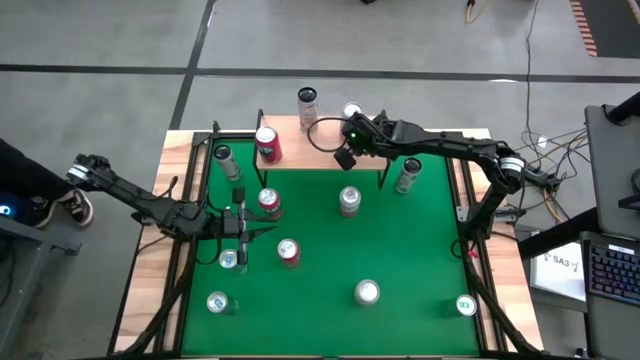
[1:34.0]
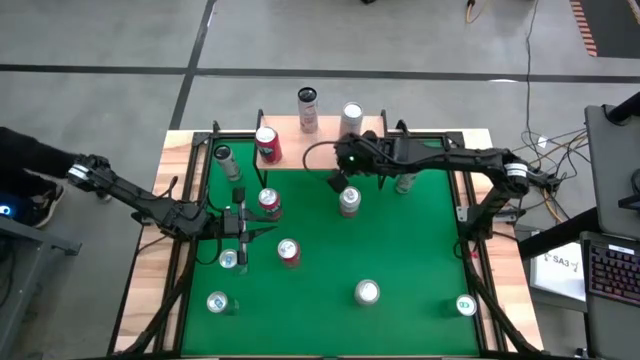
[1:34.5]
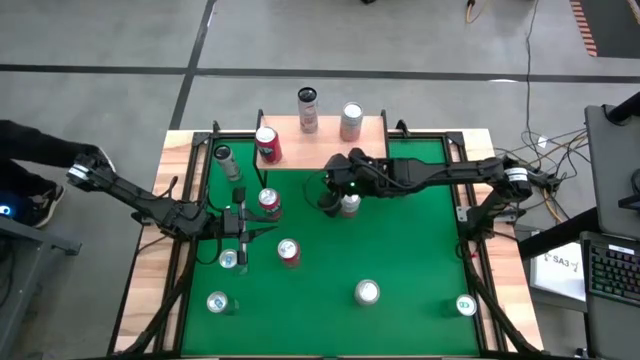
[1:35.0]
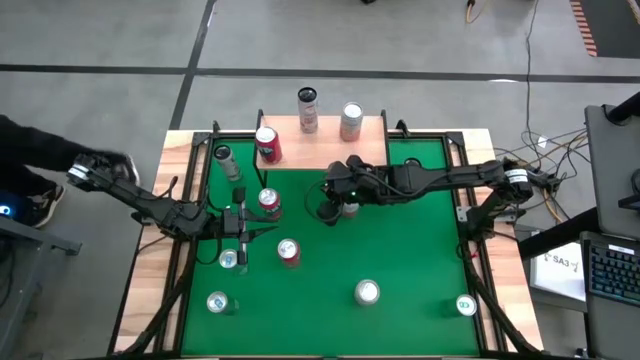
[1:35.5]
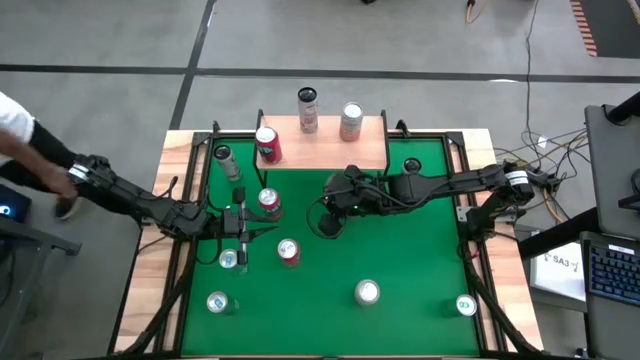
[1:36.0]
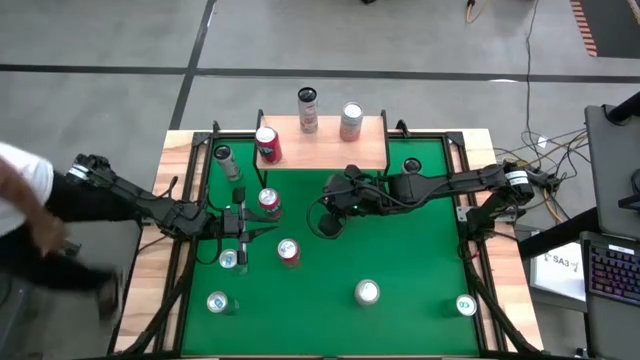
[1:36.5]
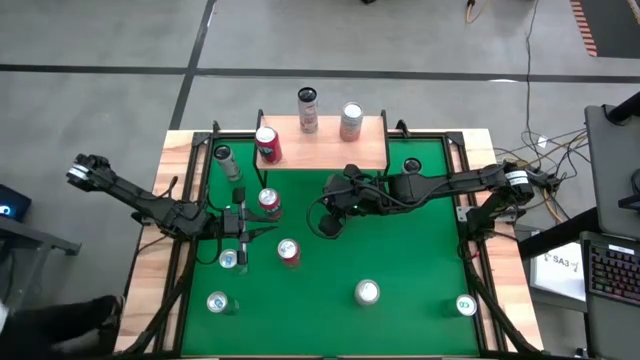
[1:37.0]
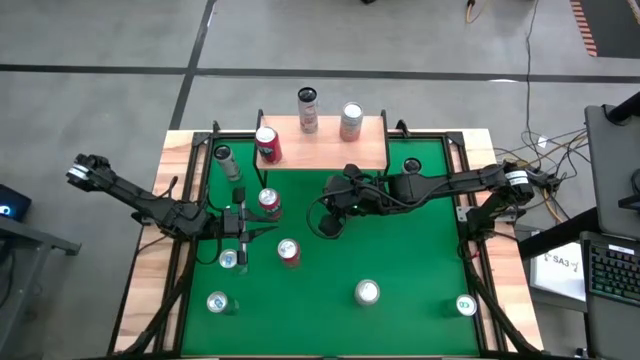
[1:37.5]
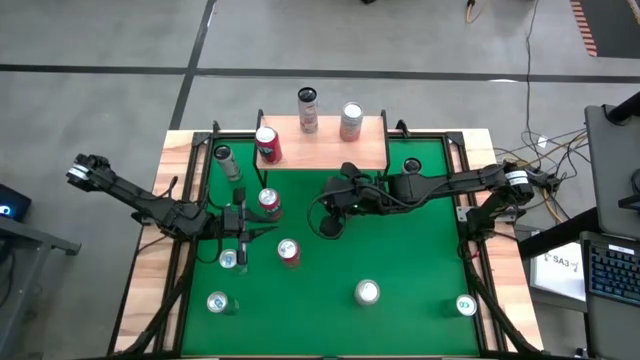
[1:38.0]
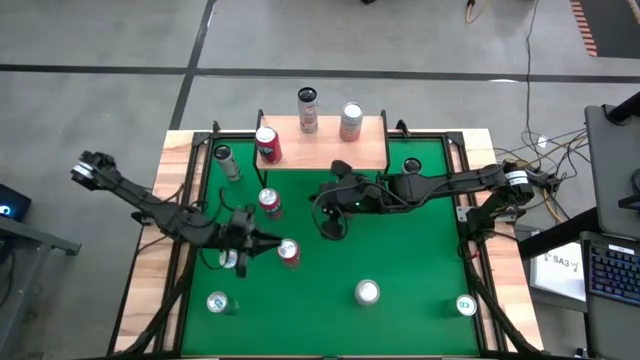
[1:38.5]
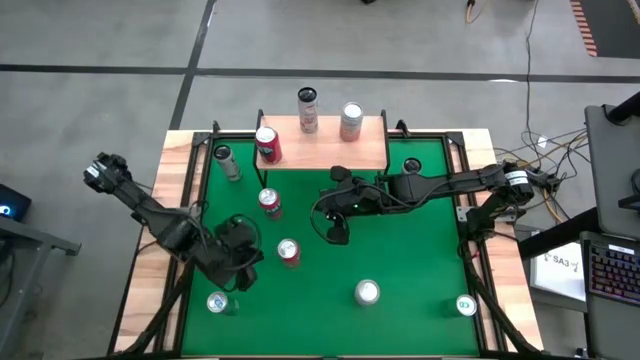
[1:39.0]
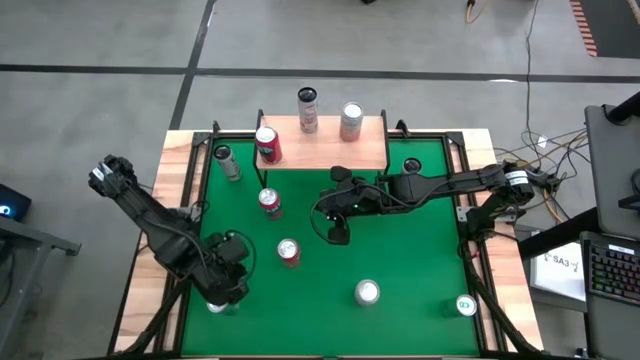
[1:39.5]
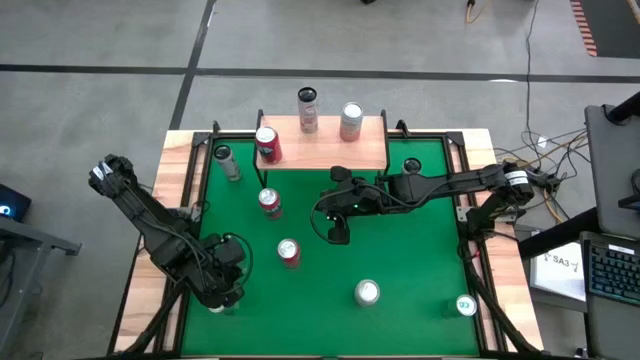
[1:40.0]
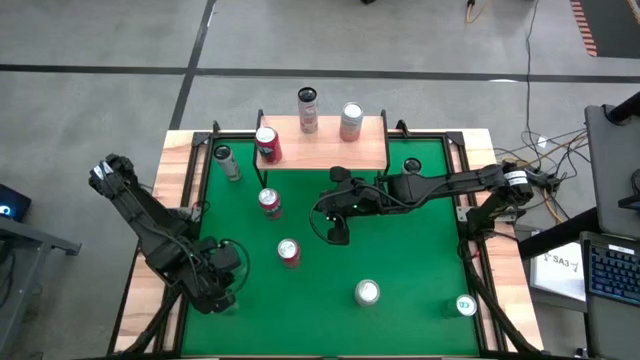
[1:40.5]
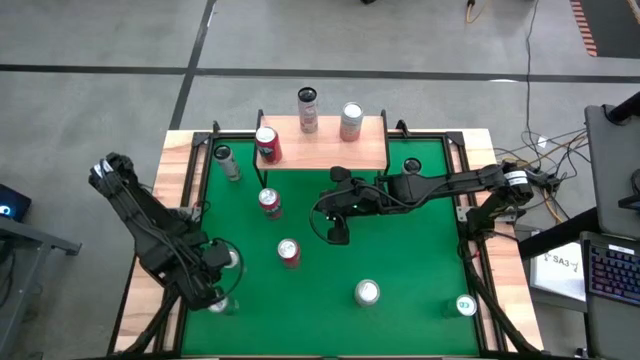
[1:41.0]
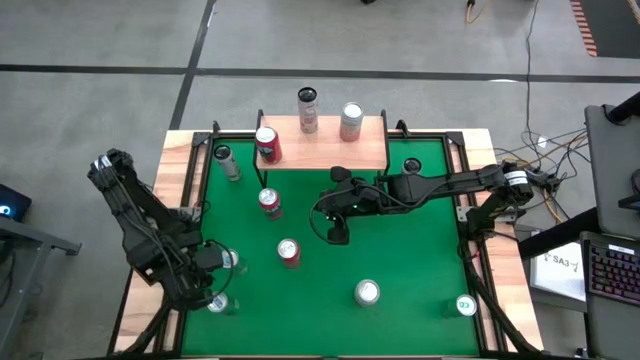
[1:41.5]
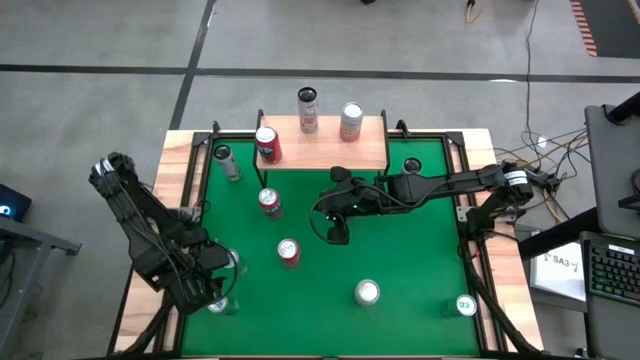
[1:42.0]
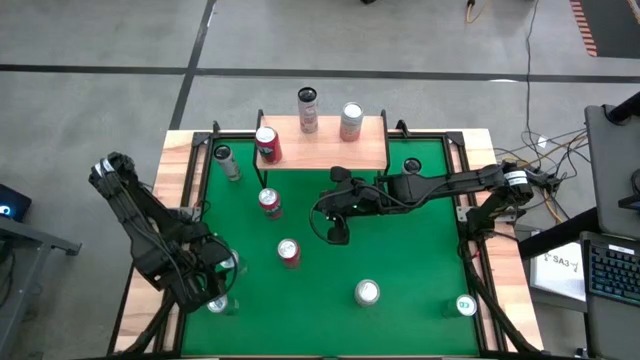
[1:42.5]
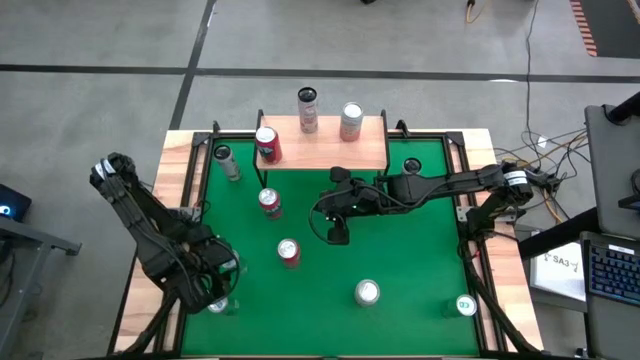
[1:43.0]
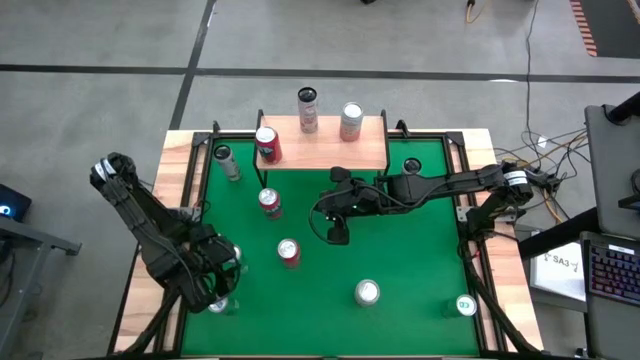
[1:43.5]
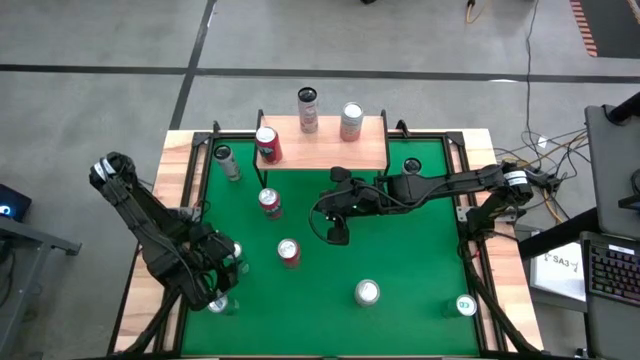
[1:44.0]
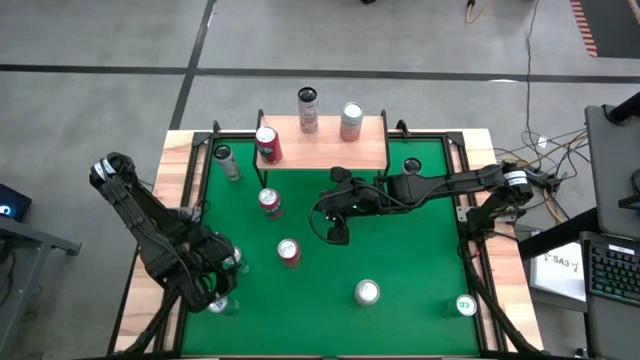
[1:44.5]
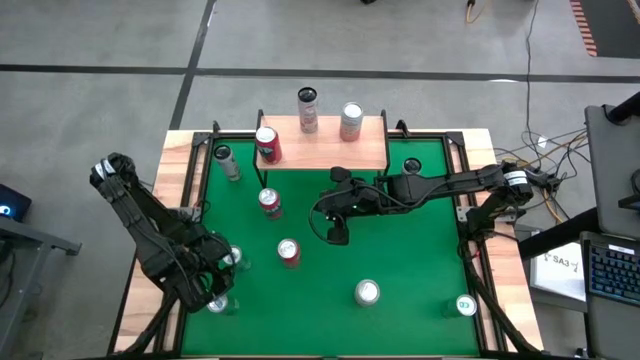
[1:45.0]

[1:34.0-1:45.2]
Task: Place canned beverage on shelf
Put the top left blue soda can on the shelf

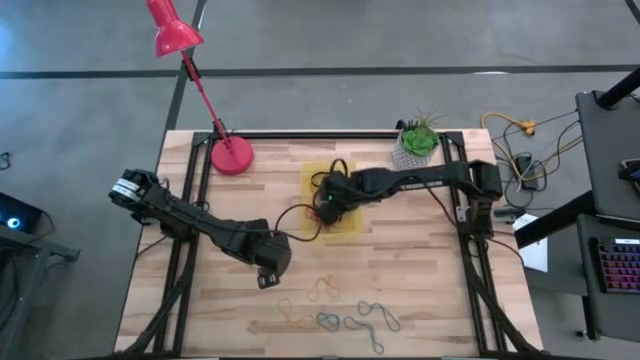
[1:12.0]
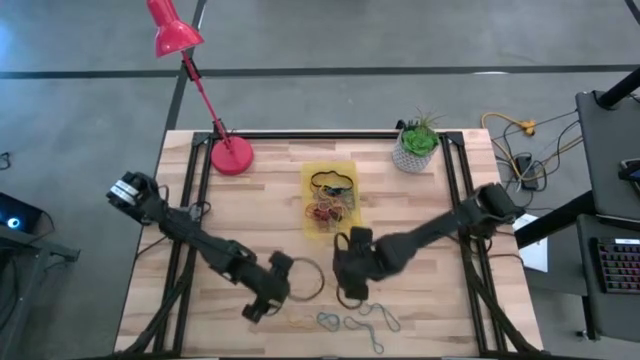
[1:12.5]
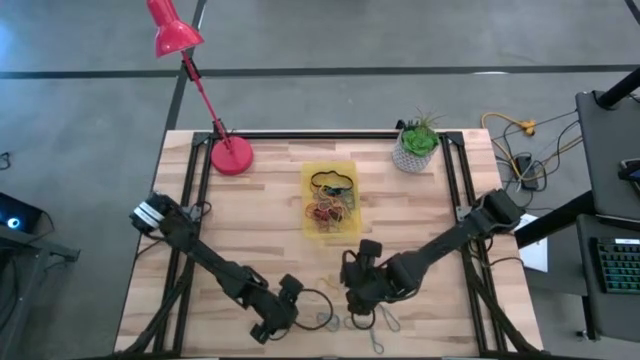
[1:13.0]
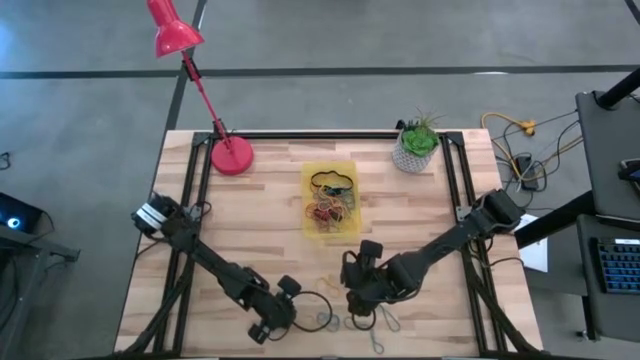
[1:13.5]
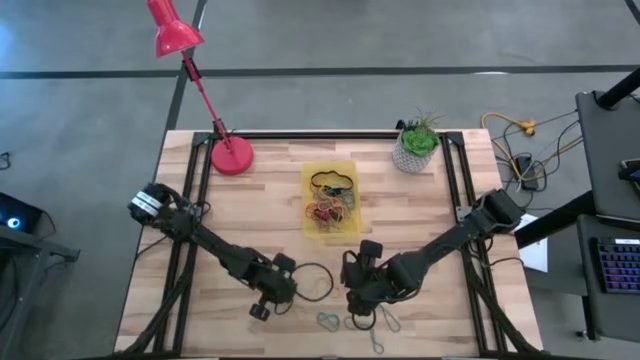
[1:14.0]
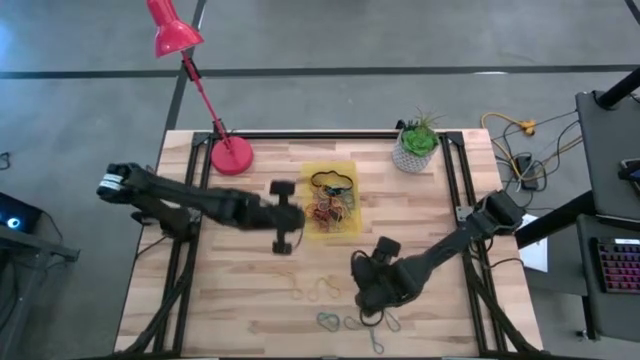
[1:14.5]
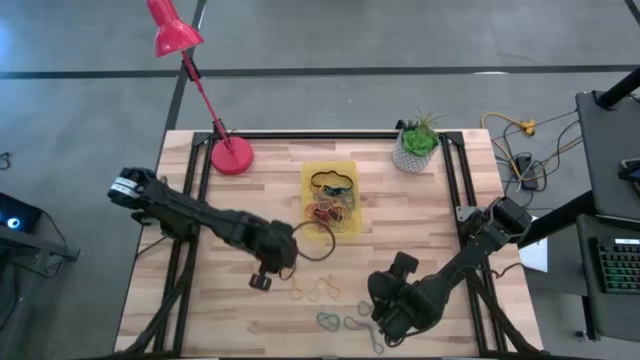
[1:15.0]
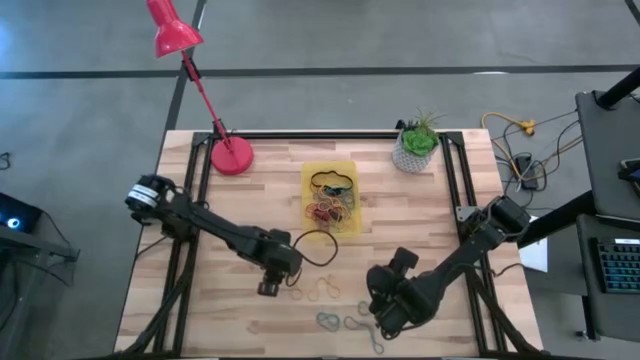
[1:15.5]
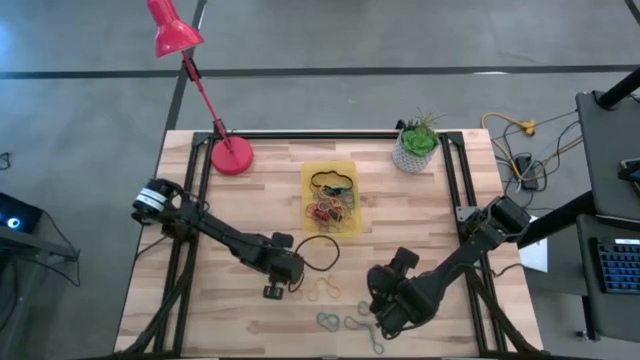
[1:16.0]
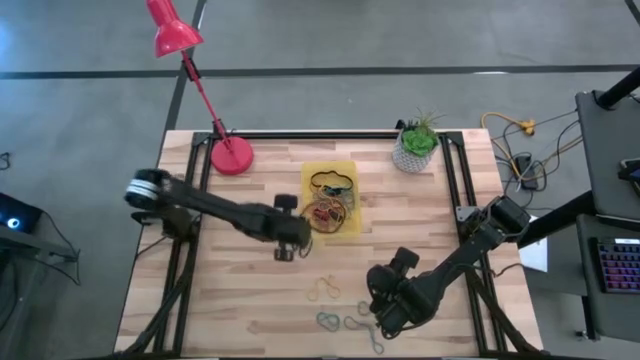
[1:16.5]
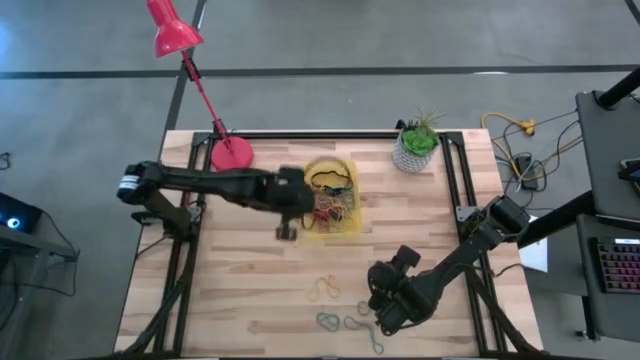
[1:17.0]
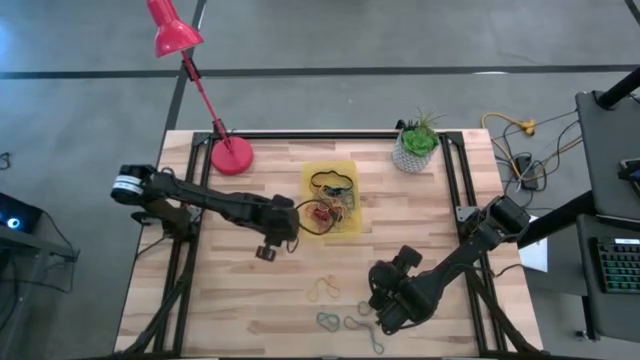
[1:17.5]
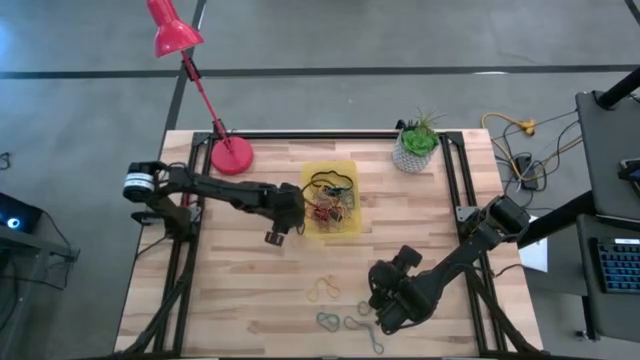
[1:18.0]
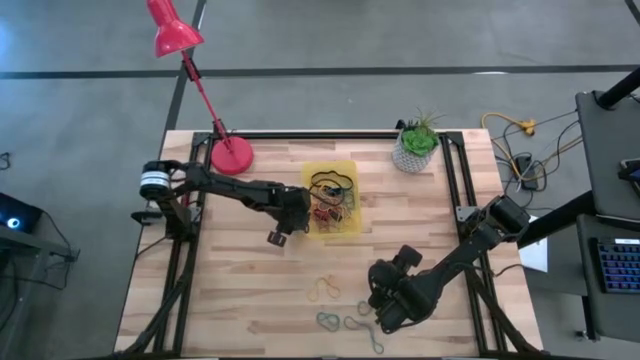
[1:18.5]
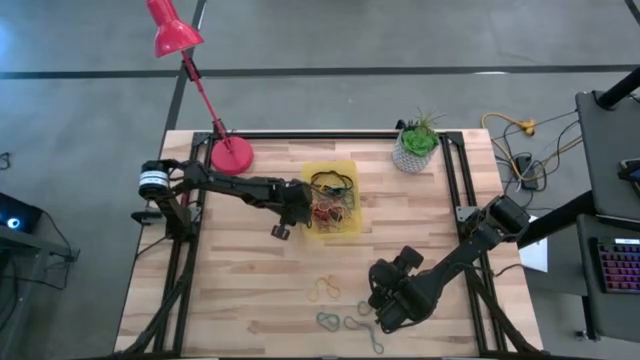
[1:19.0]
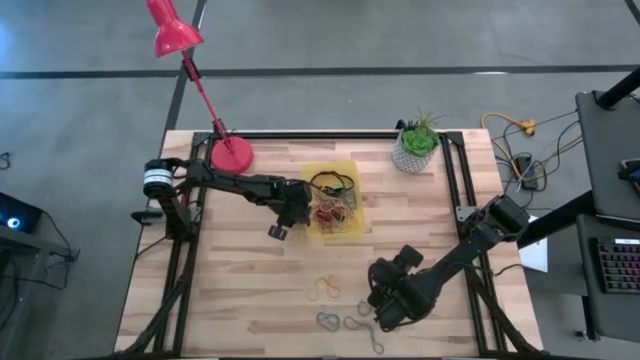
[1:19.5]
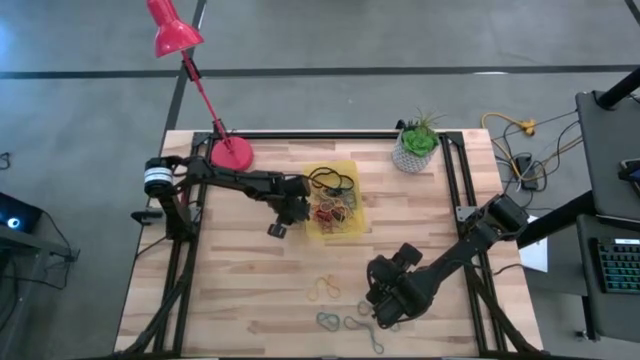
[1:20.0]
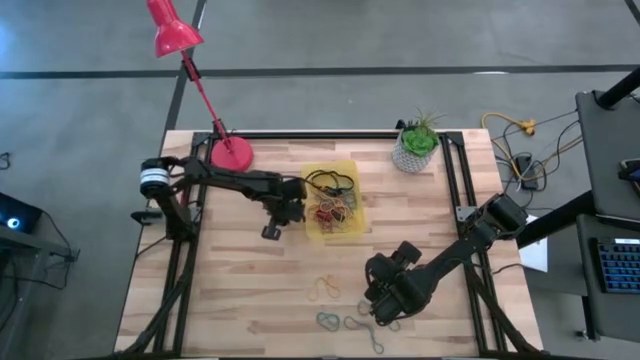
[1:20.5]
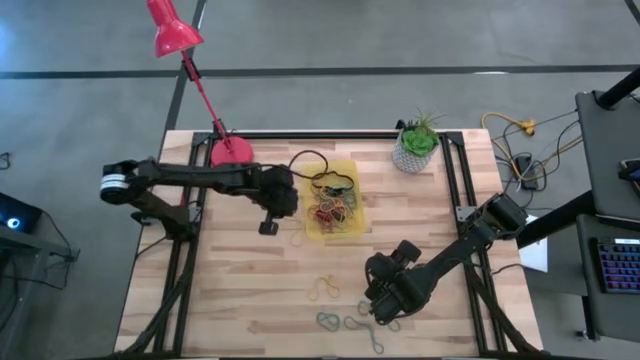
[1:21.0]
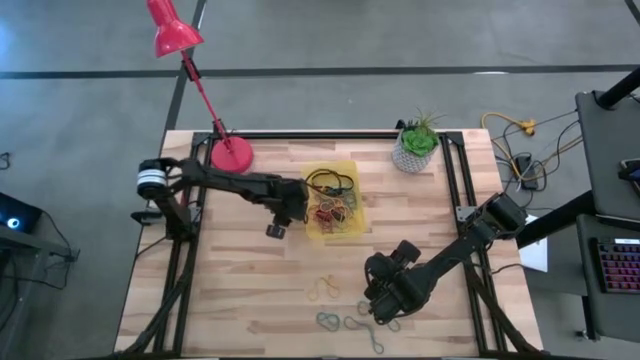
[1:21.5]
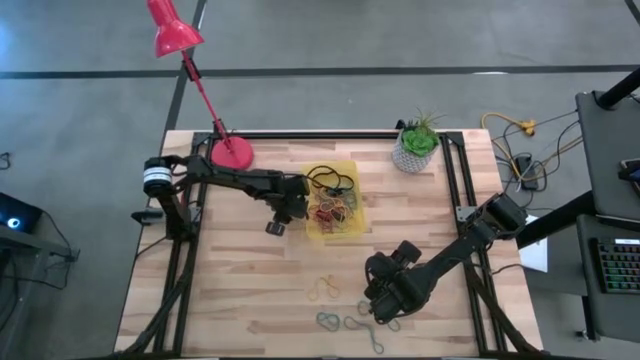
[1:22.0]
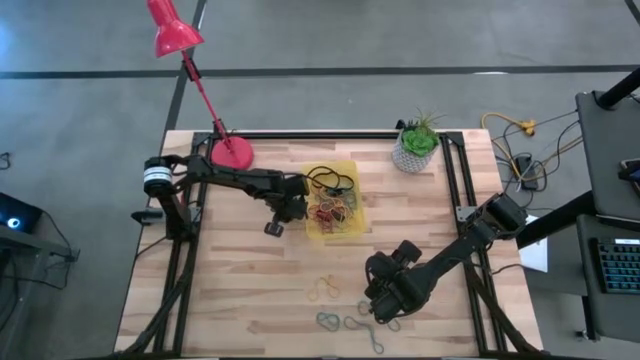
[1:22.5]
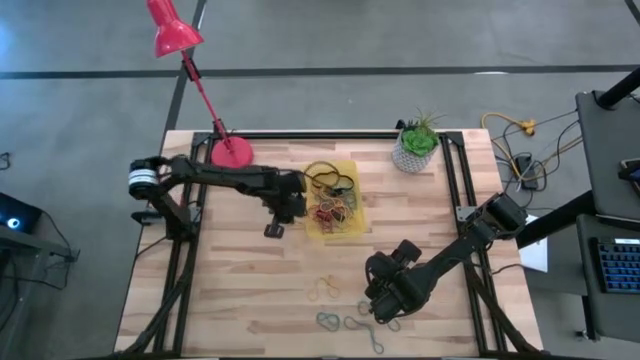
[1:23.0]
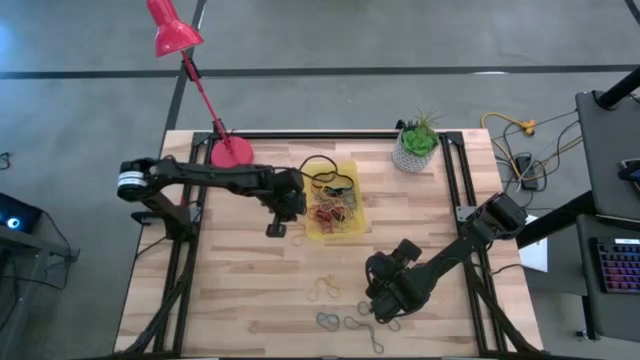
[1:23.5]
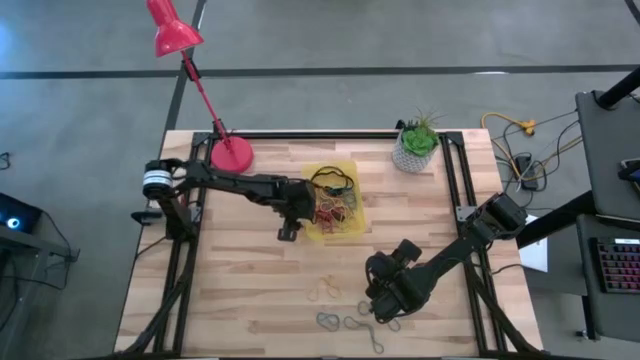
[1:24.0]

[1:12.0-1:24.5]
Task: Pick and place rubber bands into bin
Put the yellow rubber band into the yellow bin
